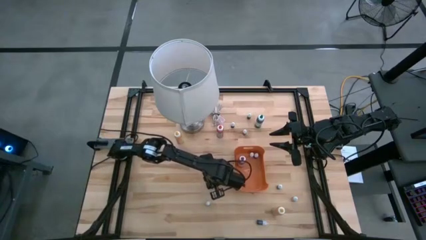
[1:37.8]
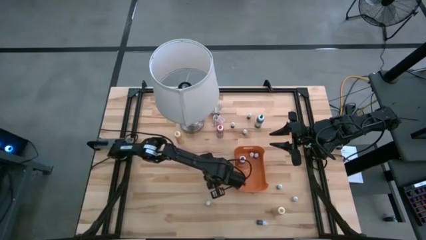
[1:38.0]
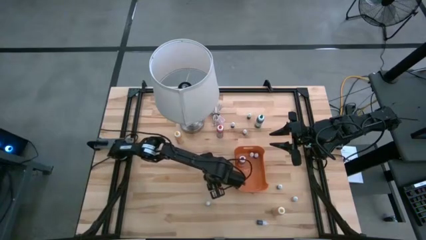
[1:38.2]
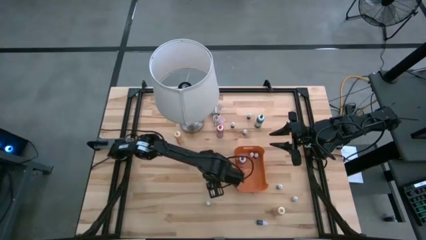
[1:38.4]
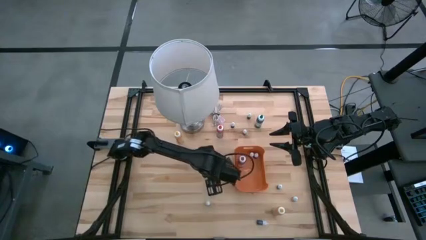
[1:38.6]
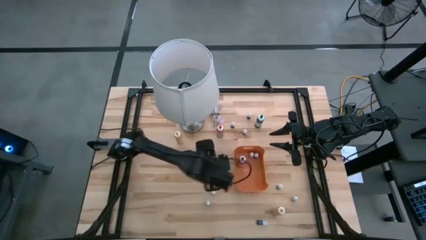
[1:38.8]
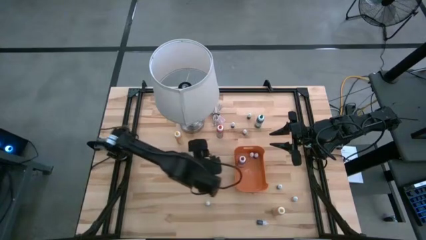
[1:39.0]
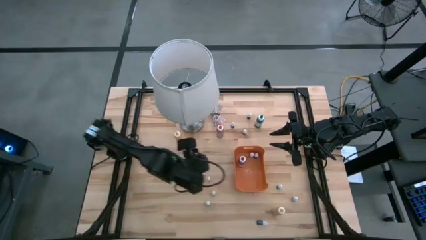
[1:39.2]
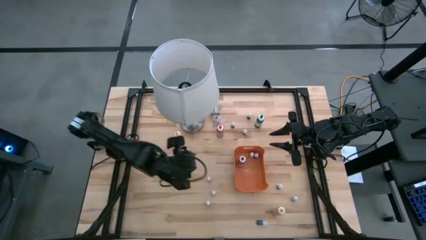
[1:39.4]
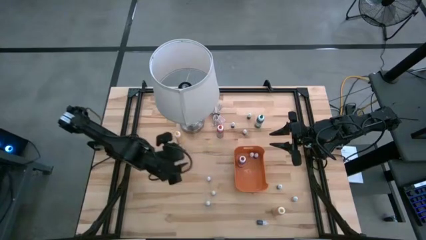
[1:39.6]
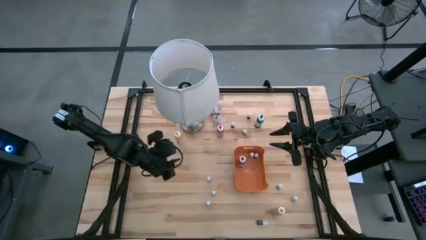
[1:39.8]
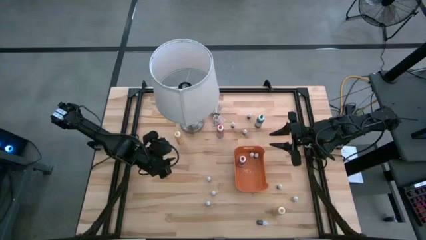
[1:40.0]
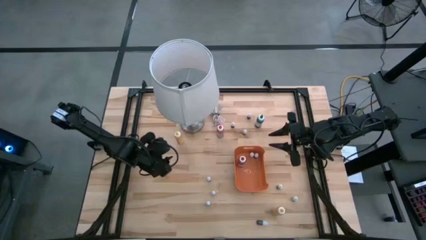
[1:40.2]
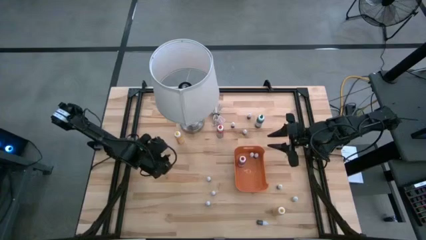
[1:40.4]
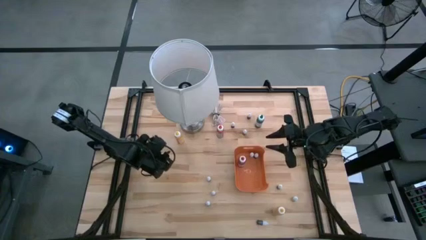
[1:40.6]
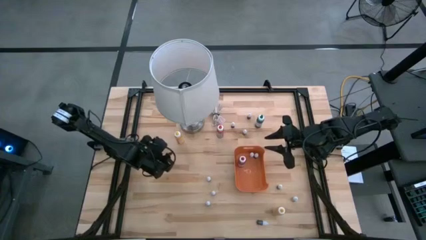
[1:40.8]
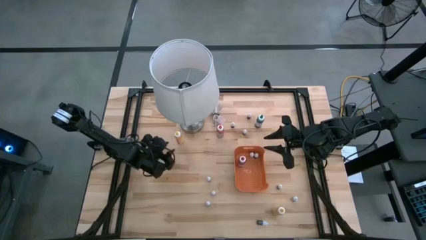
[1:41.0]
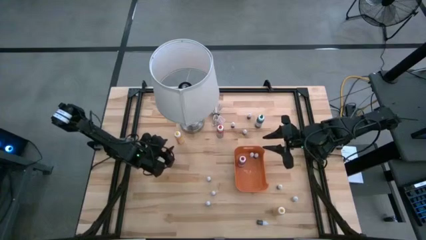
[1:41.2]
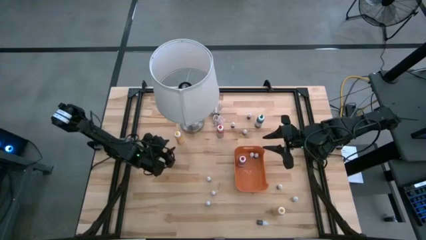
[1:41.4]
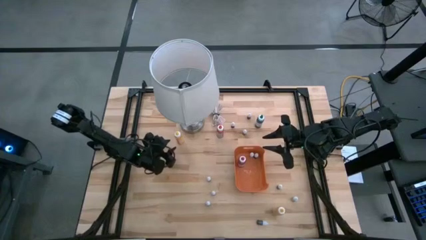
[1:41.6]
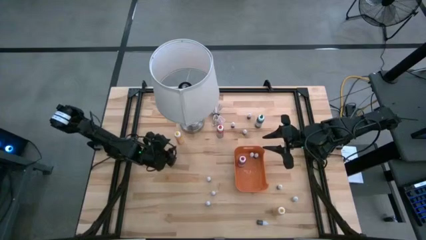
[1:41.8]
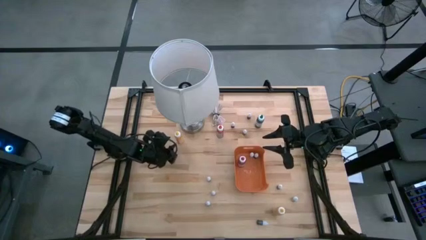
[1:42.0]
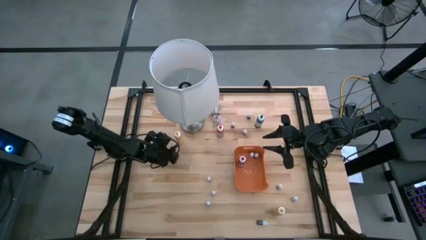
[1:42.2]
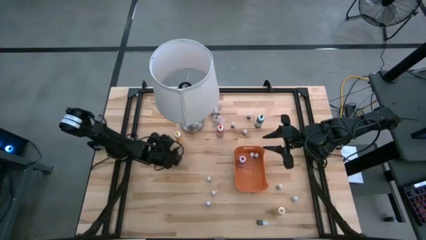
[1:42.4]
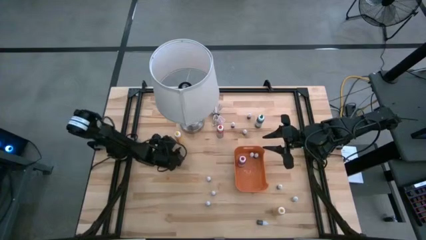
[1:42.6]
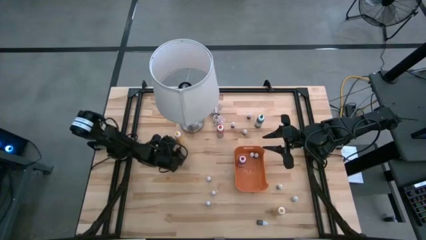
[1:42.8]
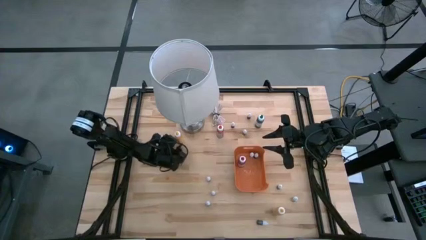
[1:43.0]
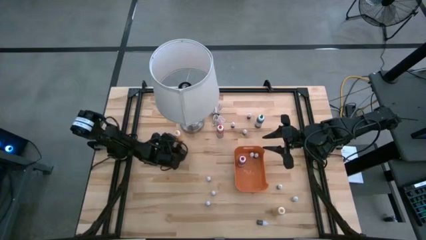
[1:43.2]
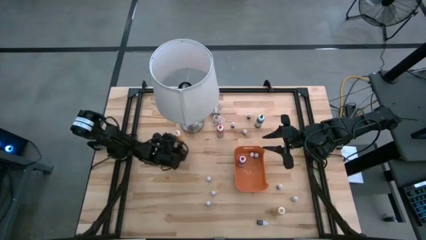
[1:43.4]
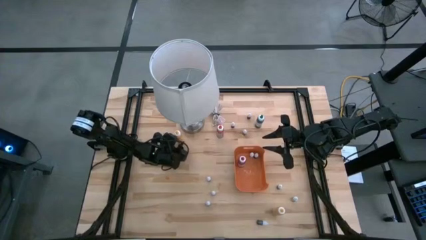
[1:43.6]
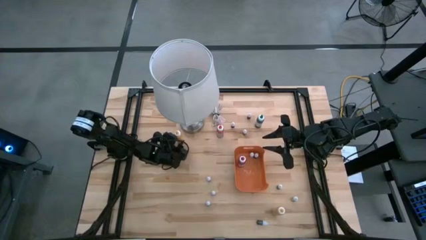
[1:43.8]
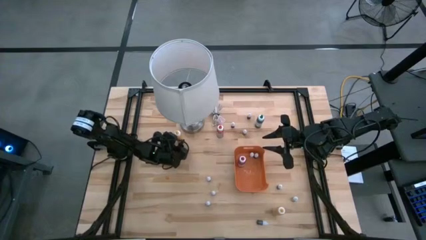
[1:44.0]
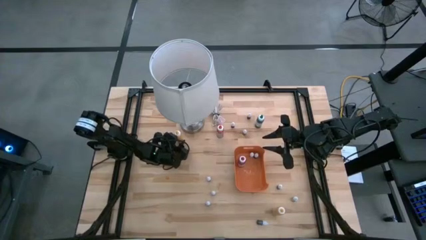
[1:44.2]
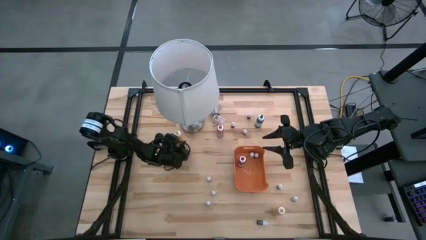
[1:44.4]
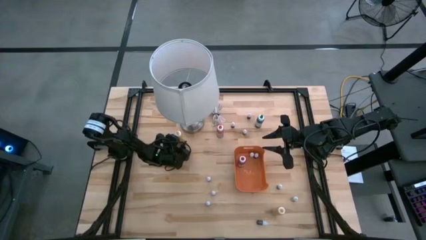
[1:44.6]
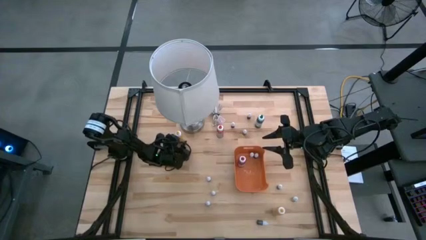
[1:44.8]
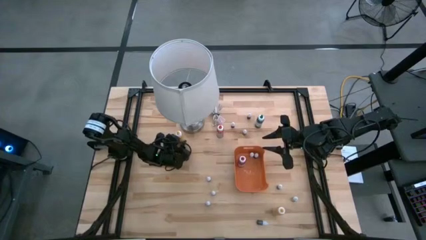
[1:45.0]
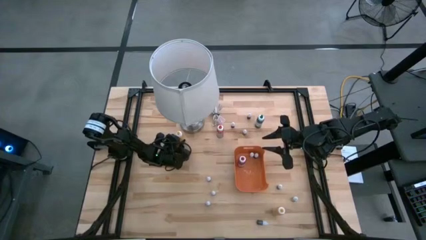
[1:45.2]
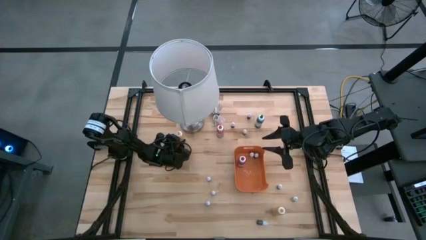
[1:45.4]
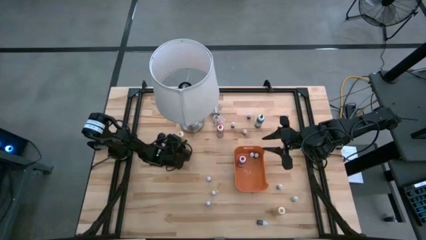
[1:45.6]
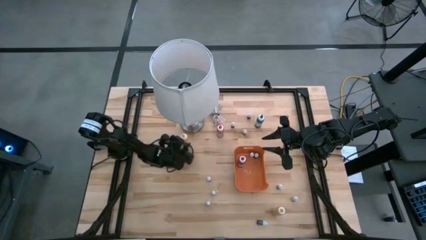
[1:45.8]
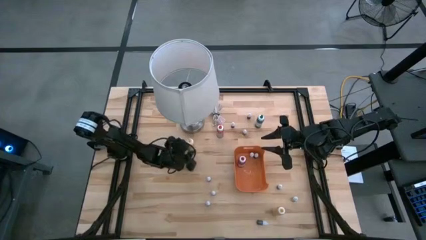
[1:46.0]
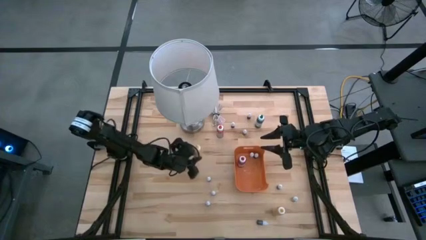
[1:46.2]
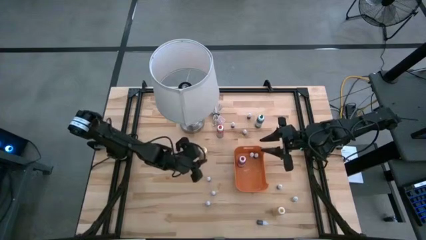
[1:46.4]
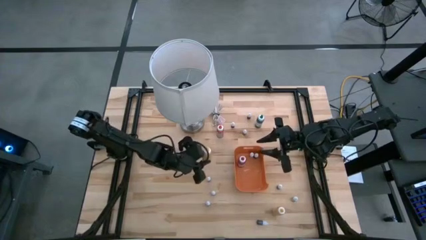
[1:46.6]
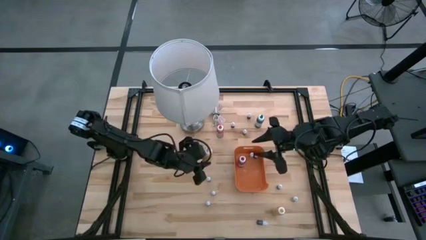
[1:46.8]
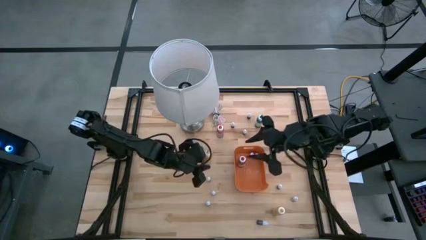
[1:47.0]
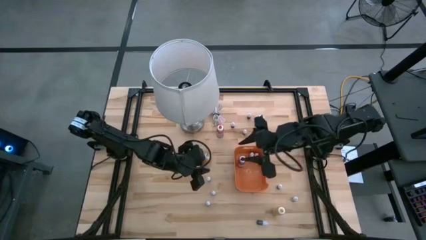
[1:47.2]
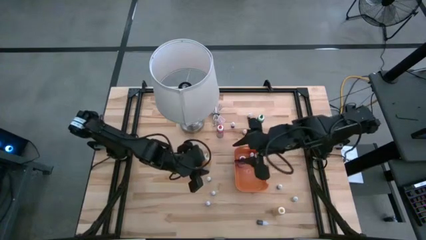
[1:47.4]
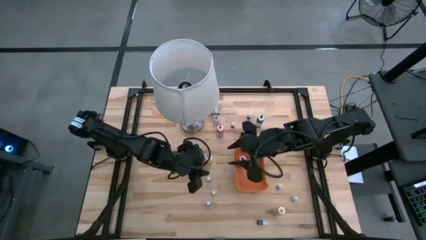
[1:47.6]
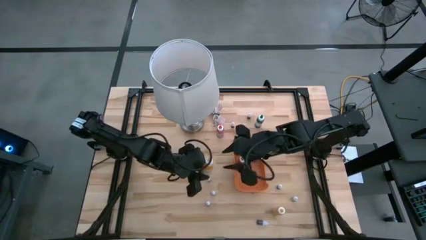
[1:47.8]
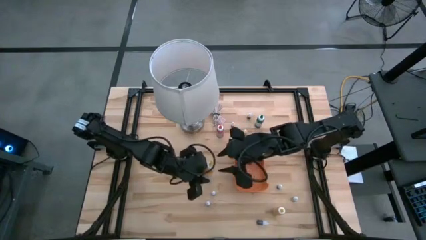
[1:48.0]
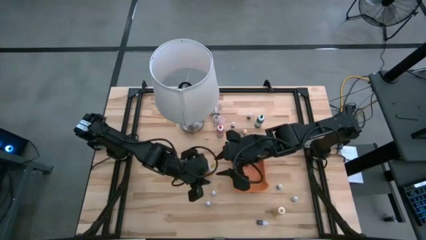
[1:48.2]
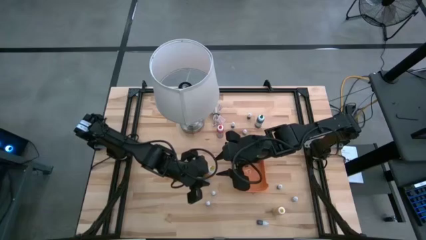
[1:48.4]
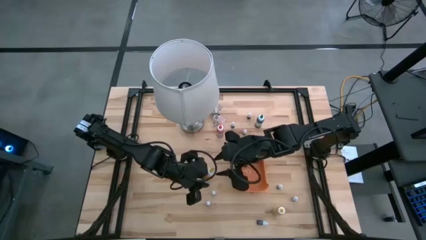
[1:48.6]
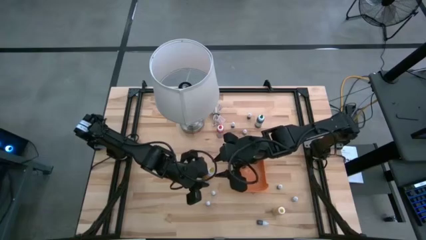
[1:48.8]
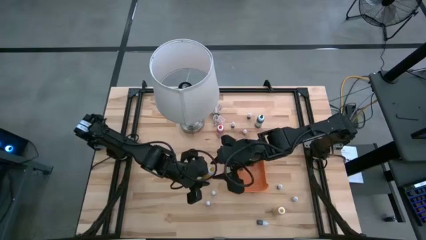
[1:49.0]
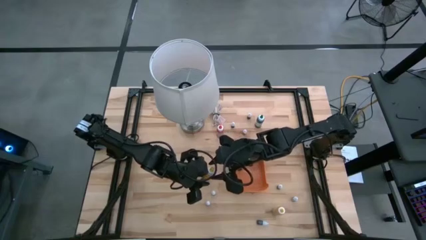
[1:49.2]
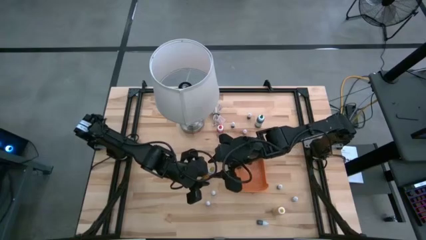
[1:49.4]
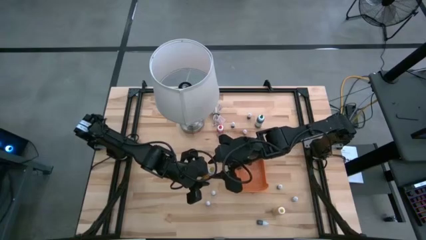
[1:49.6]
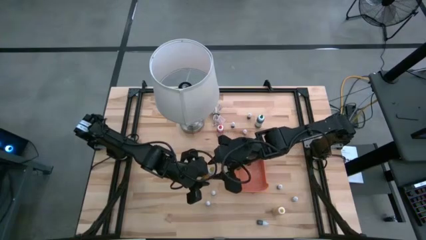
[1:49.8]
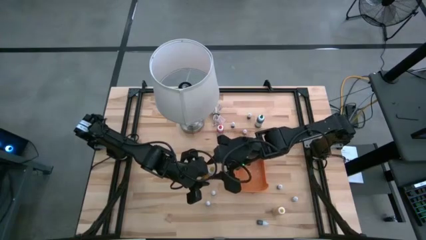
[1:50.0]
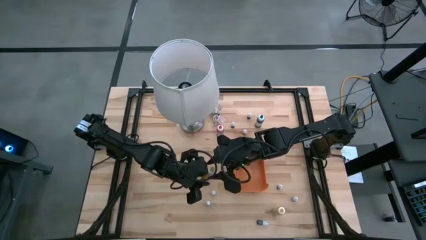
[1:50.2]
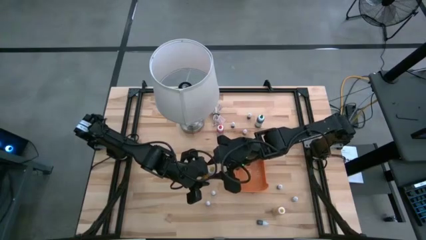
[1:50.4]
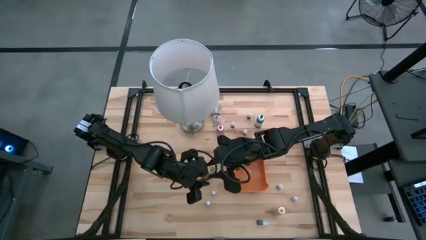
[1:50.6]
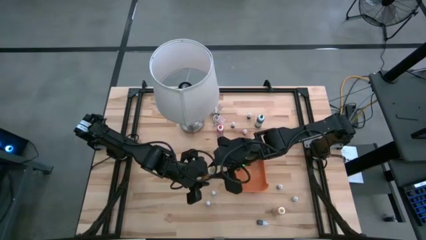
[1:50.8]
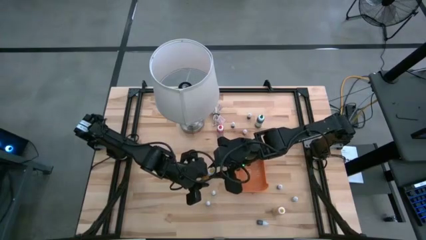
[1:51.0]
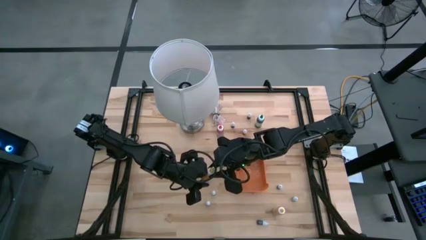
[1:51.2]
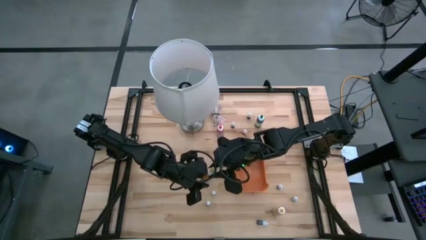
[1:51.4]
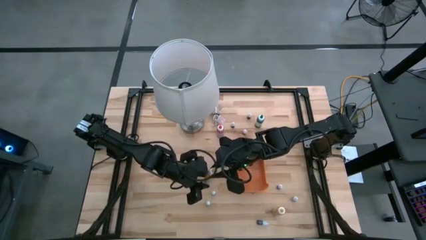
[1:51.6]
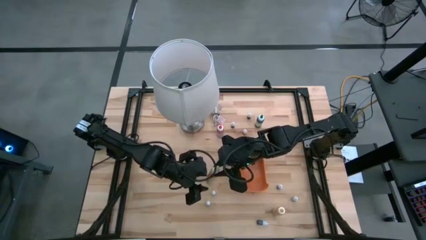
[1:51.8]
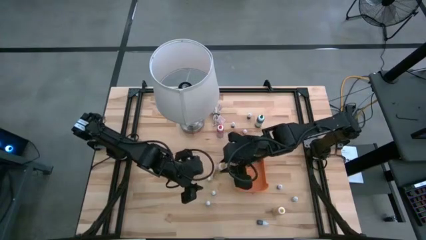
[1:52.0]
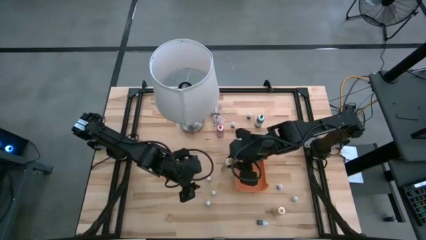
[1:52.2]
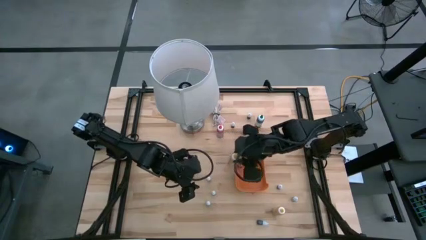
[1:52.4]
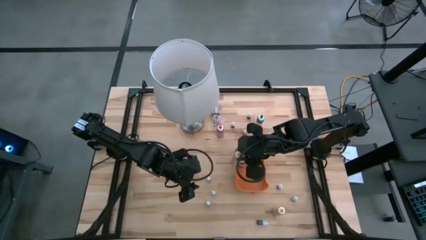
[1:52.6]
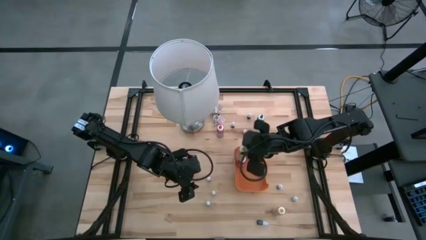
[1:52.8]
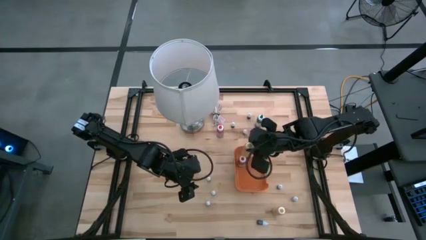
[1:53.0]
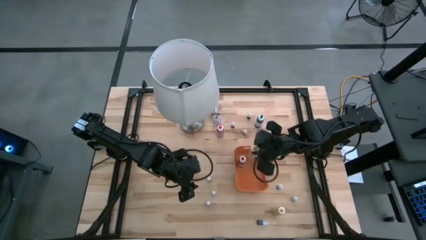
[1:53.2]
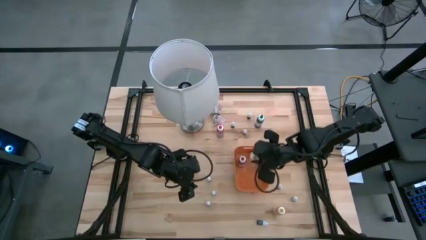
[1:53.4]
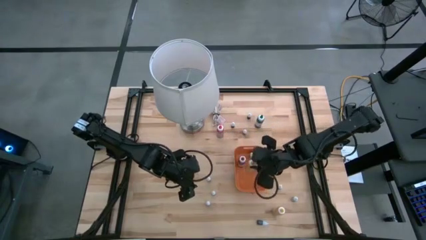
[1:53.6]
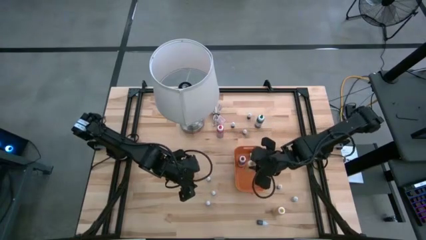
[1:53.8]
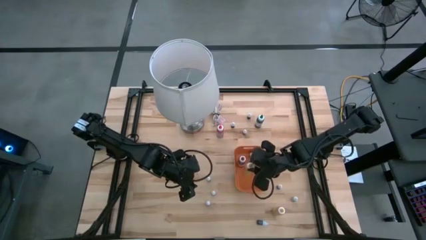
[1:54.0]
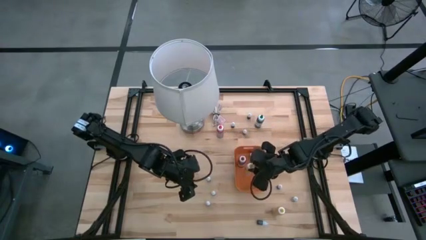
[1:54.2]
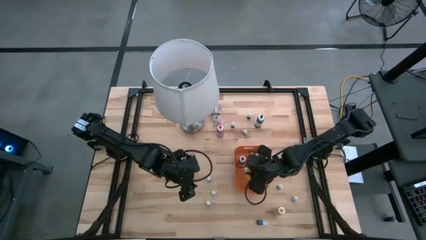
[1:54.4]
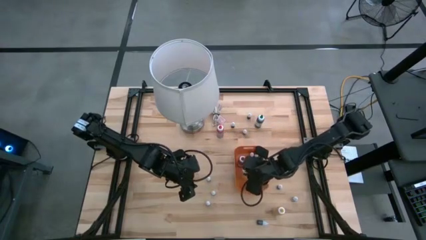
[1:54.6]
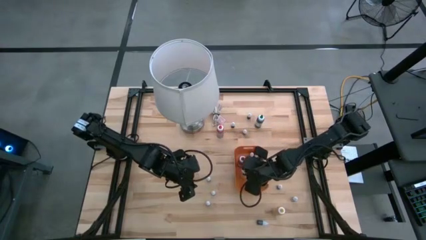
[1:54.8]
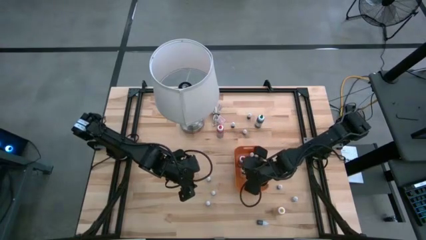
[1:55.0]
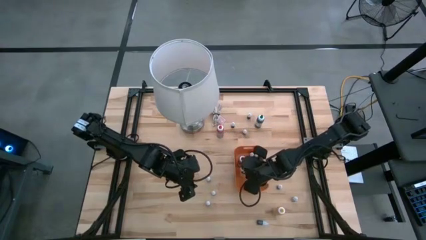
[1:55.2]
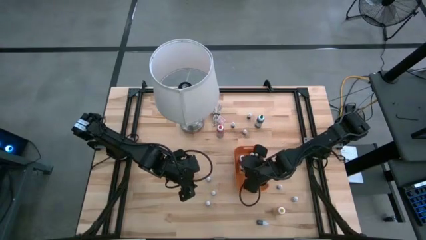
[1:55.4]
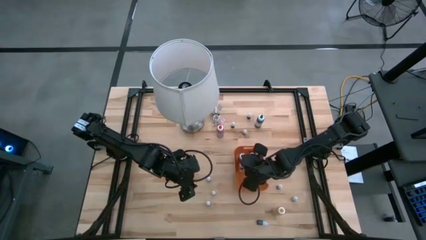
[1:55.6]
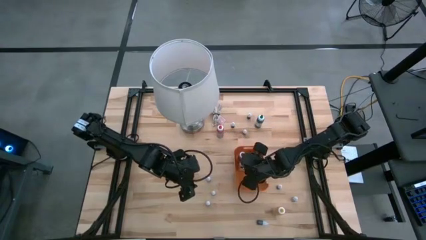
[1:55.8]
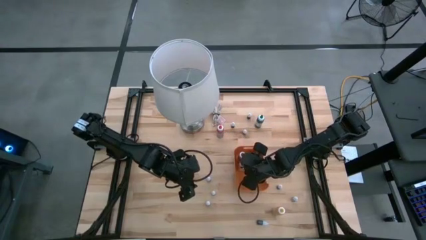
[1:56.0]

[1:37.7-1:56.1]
Task: Pick & Place food coloring
Put the big food coloring bottle into the orange bin
